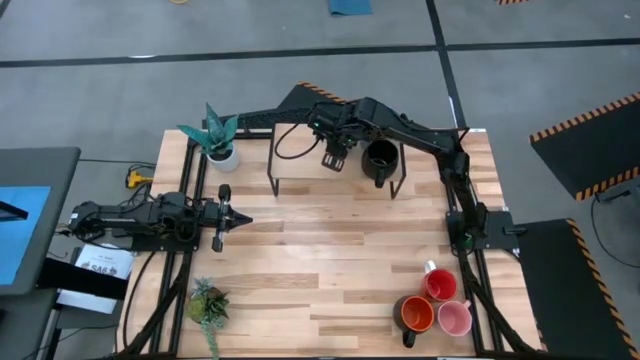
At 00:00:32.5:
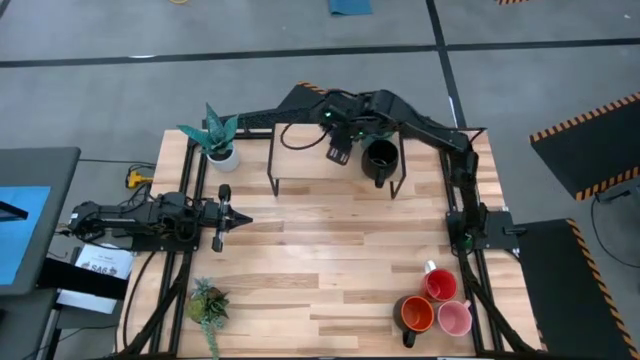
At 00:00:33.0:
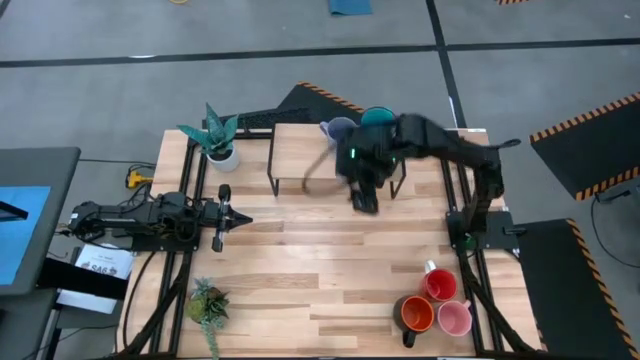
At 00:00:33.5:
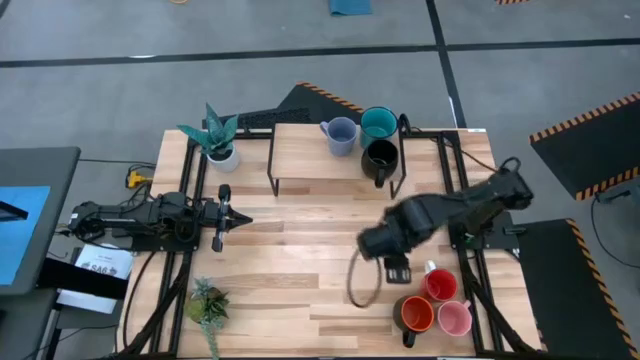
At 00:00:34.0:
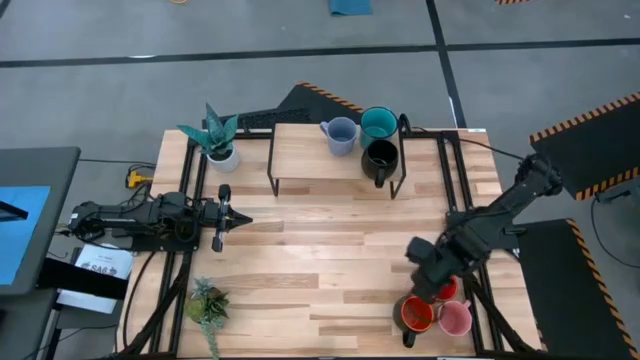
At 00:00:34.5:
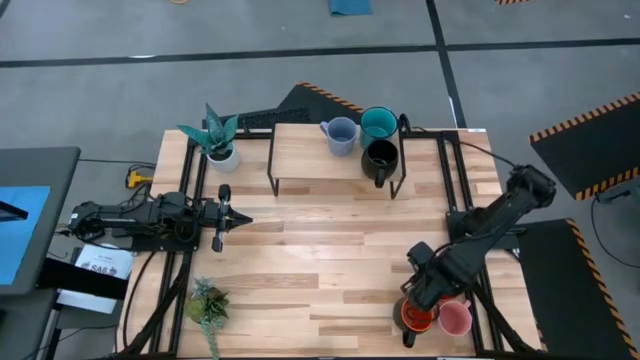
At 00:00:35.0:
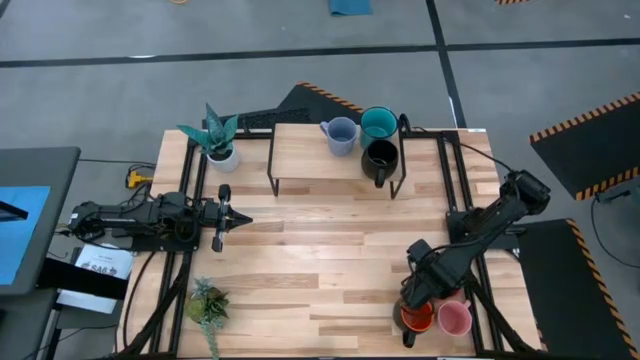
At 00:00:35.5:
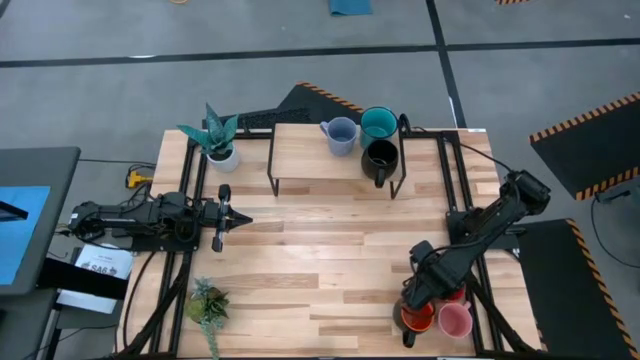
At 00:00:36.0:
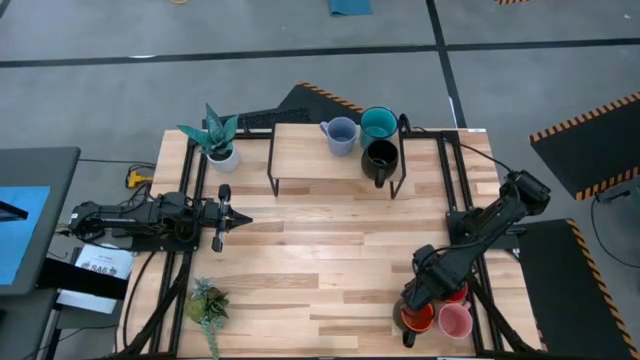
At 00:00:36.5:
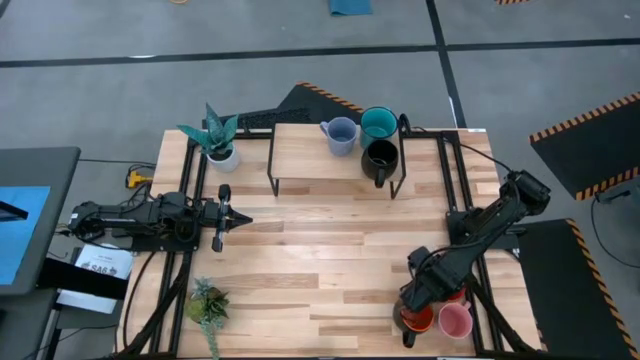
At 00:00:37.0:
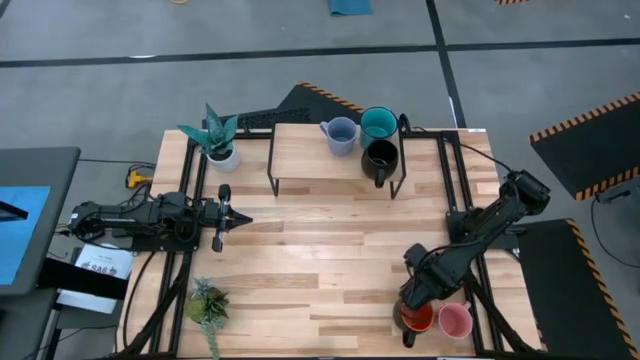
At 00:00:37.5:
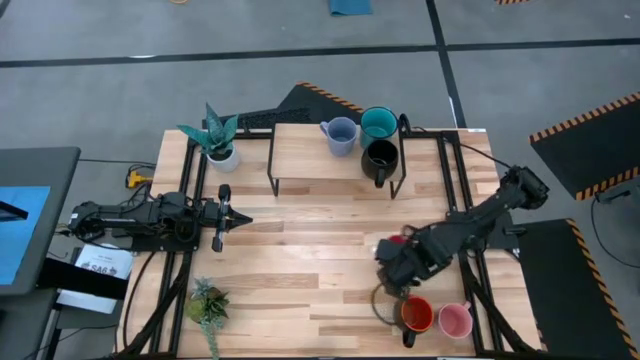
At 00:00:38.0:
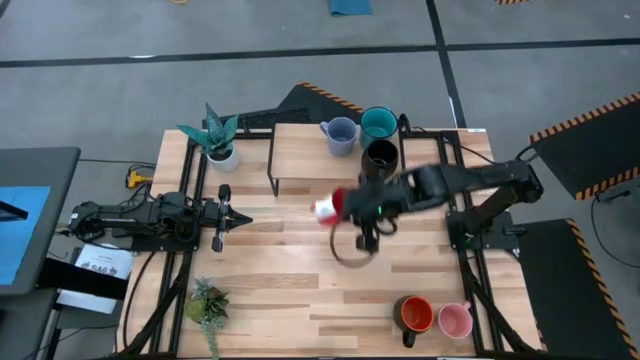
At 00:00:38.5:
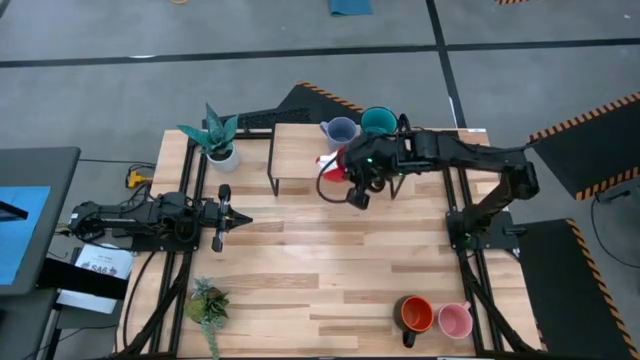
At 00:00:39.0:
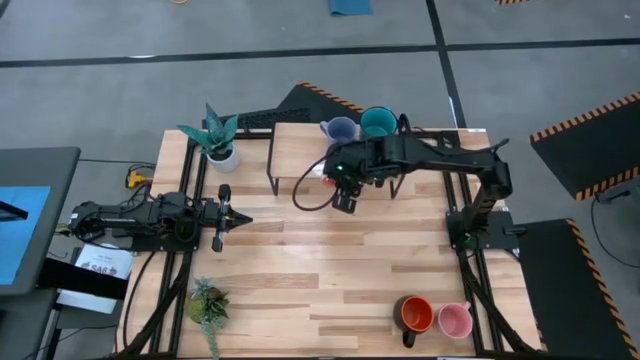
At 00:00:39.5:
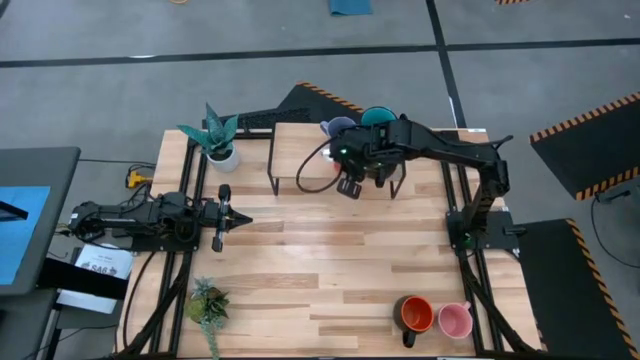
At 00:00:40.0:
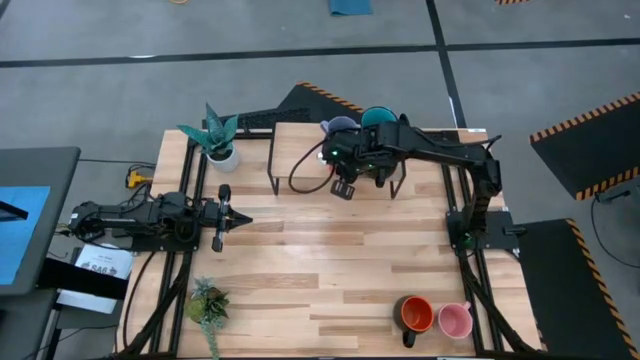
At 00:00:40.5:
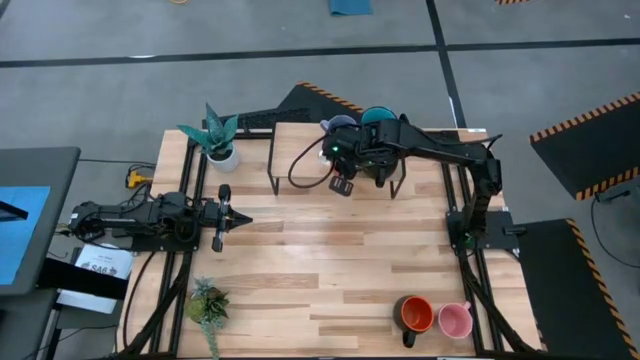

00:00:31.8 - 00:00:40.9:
Task: Place coffee mugs
Put the orange mug on the shelf

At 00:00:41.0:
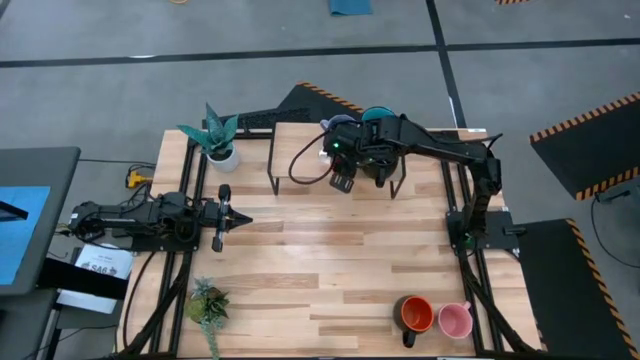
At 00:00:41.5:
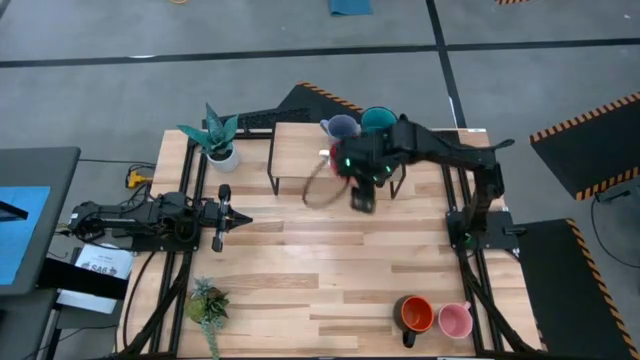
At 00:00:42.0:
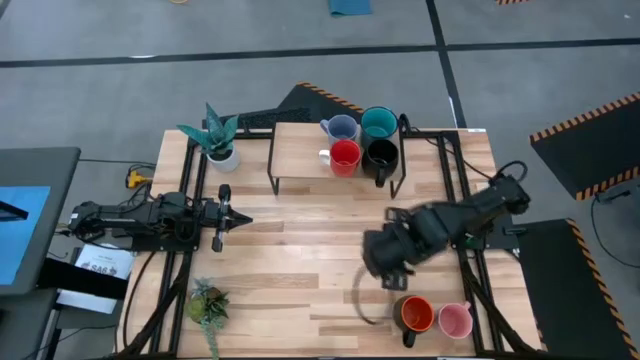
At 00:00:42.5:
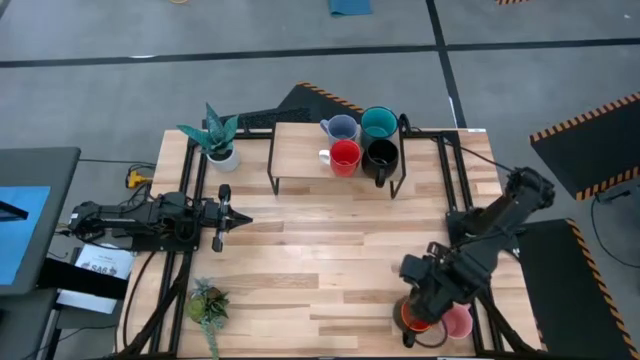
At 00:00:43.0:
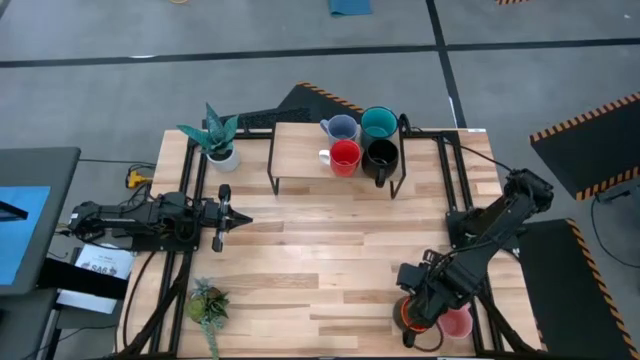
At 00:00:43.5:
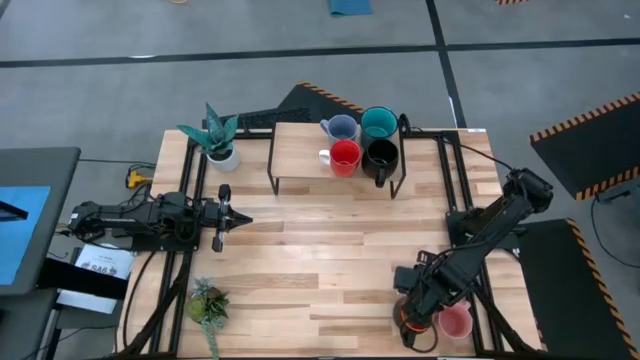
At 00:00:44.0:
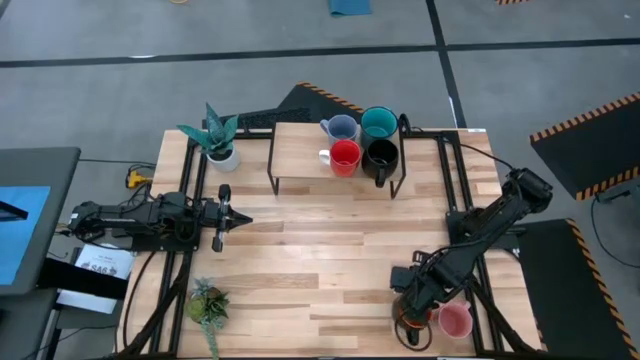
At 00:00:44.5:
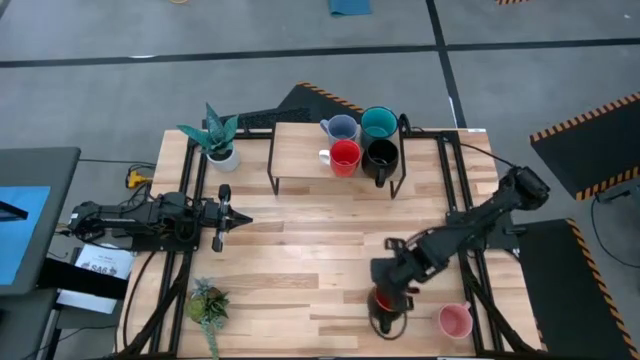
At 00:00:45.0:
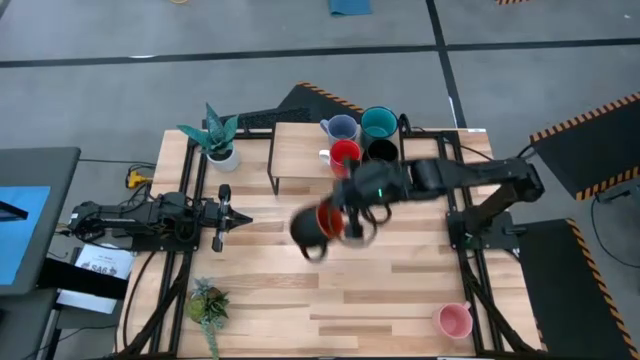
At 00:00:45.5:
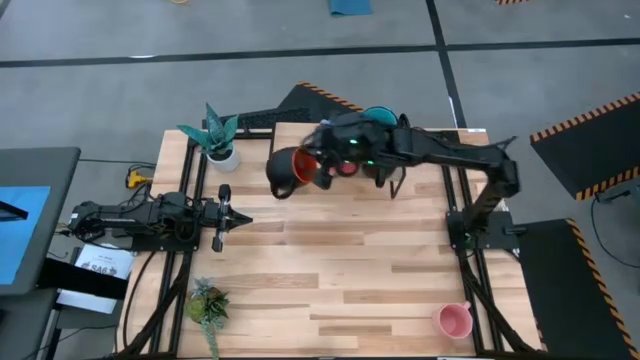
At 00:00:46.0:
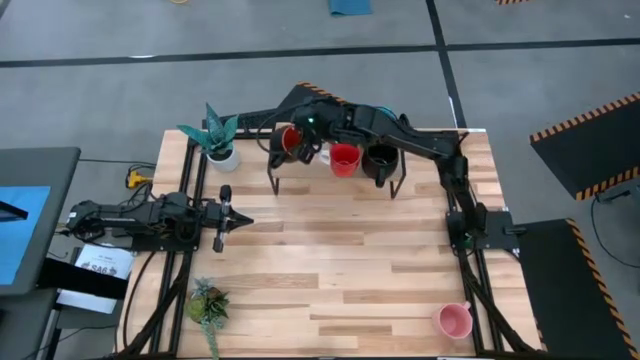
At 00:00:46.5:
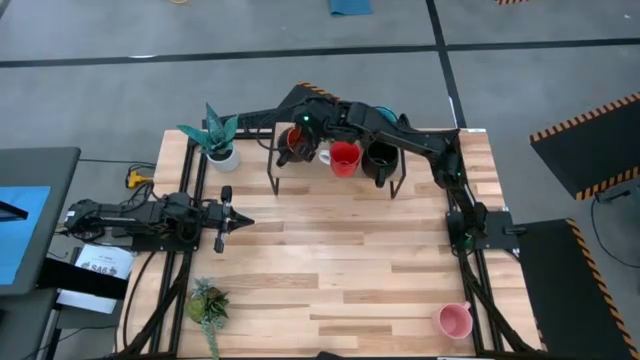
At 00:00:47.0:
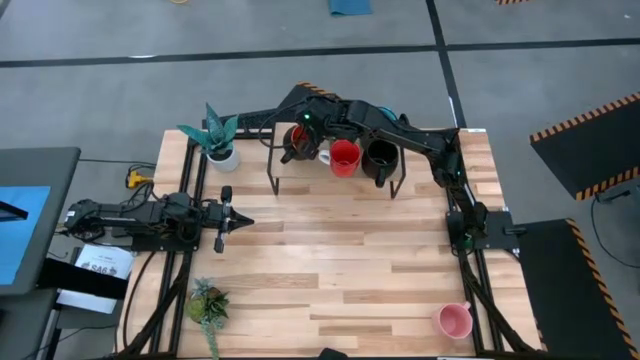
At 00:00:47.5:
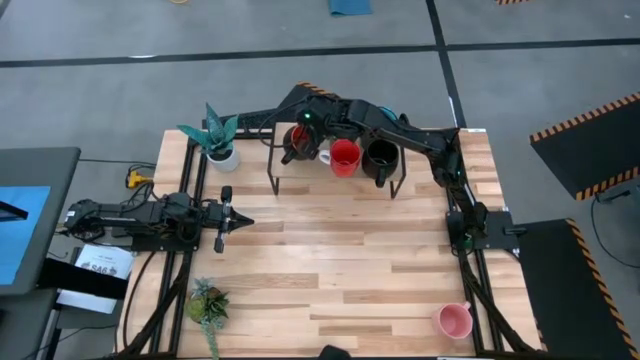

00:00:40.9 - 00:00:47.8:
Put the black orange mug on the shelf

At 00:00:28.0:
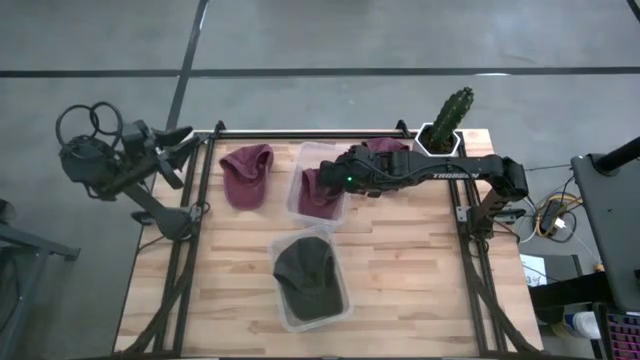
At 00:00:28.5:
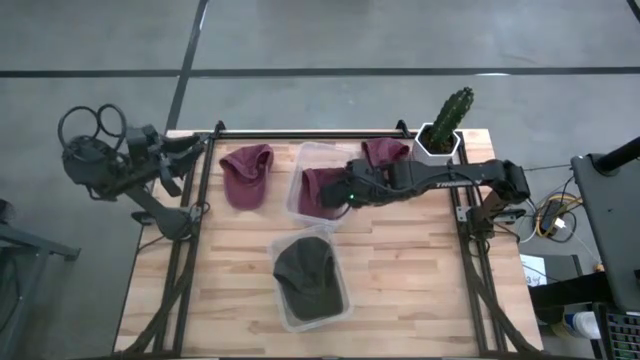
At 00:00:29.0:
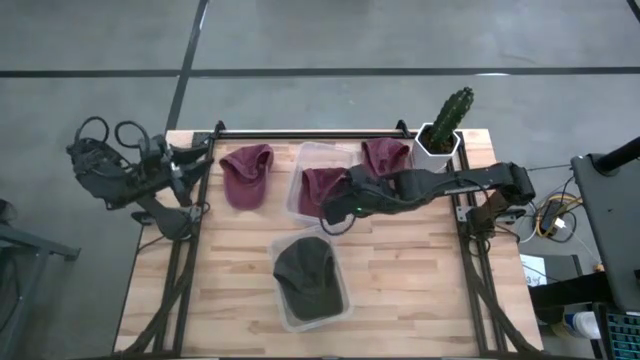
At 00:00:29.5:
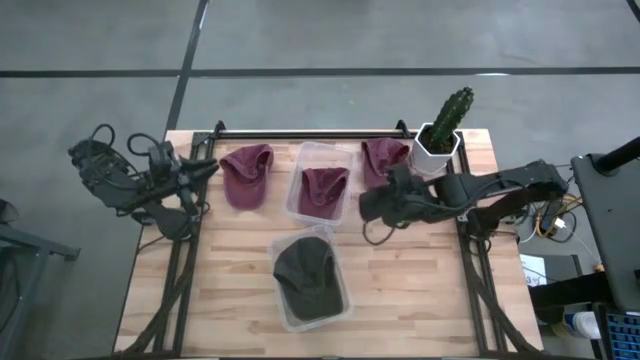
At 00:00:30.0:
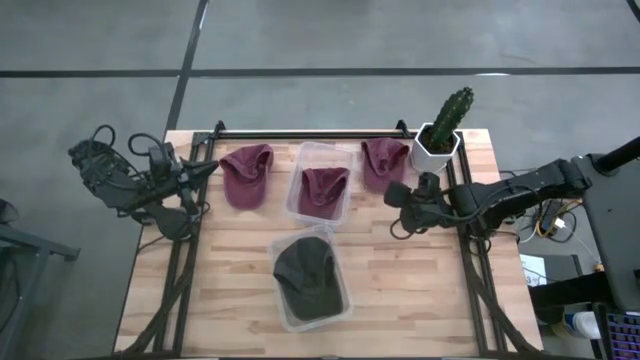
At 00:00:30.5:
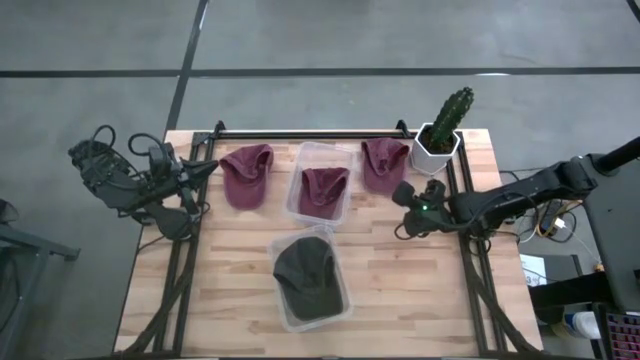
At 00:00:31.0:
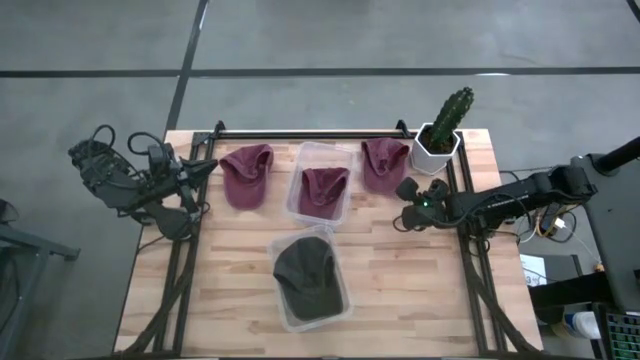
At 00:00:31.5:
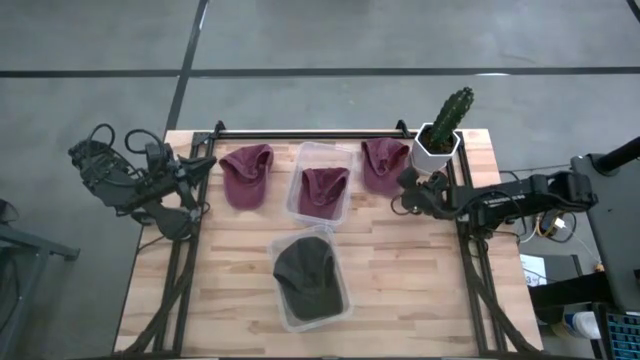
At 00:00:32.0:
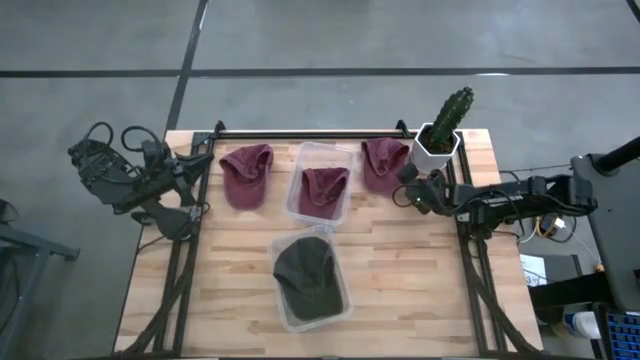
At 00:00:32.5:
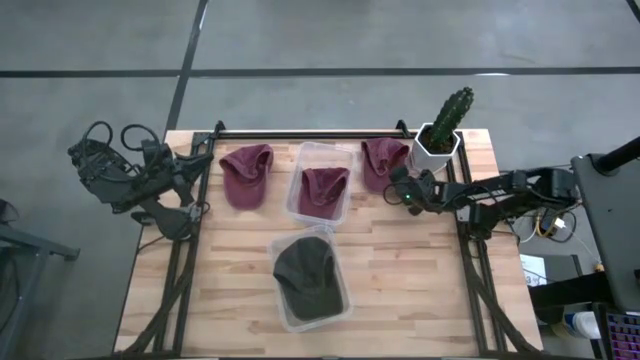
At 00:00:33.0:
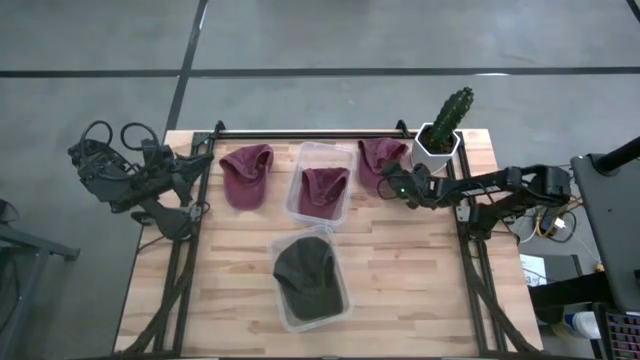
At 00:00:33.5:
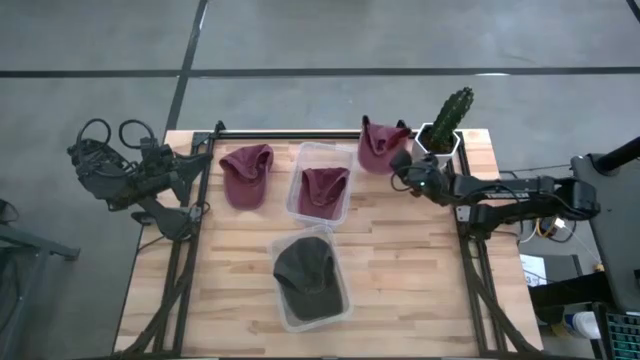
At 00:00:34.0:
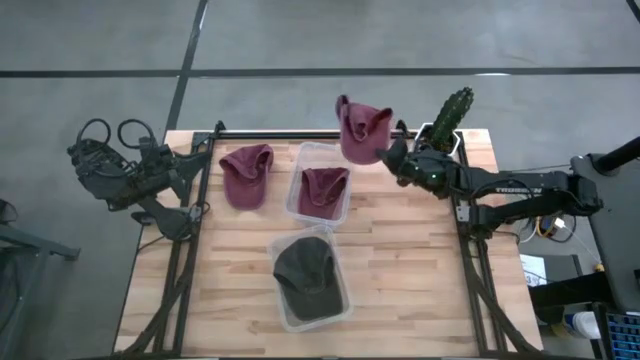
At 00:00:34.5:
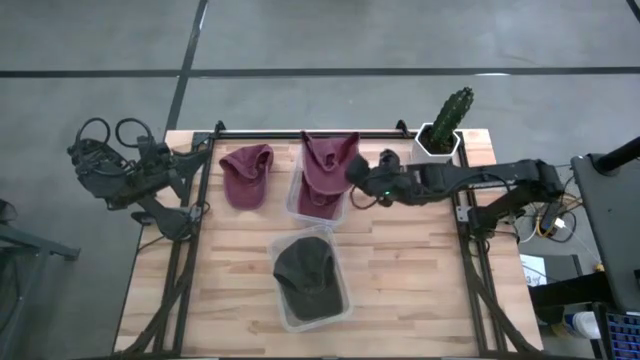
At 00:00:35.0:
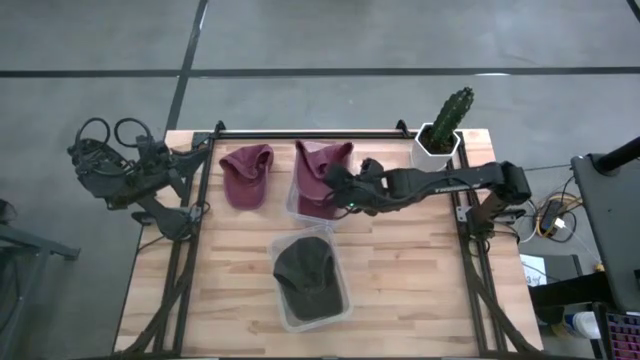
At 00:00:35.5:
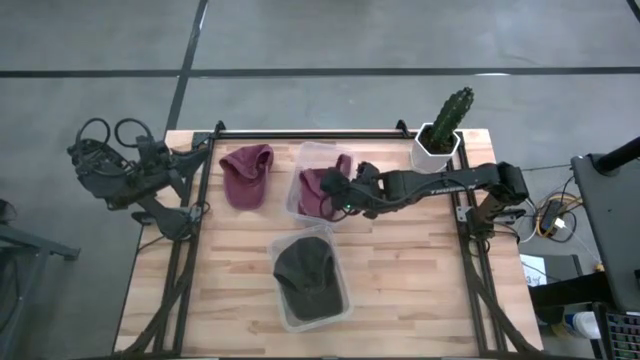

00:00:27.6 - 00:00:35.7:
Task: Pick & Place hat
Put the right red cap into the top transparent bin
